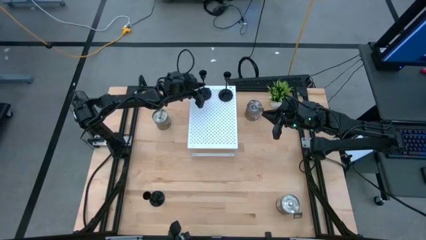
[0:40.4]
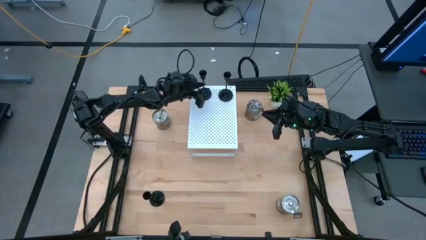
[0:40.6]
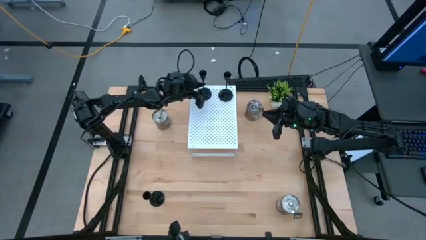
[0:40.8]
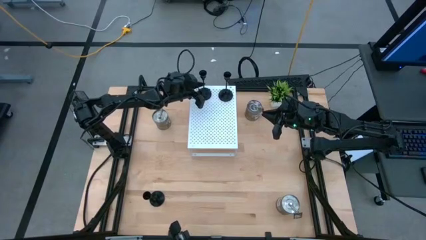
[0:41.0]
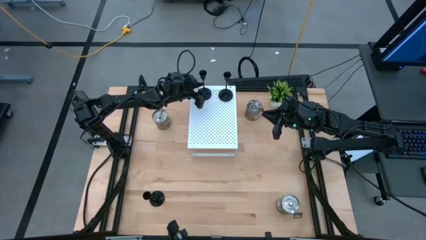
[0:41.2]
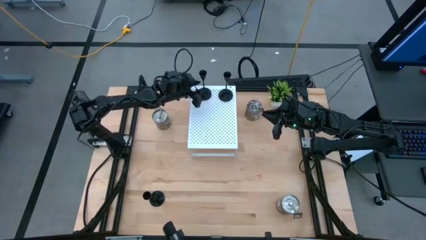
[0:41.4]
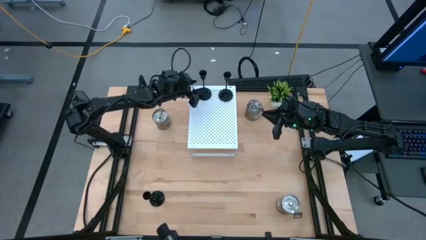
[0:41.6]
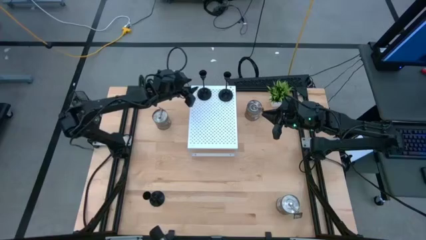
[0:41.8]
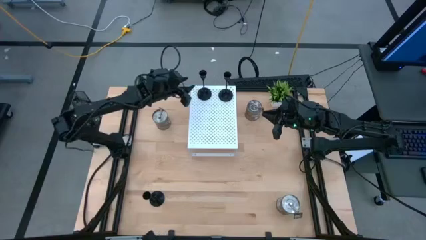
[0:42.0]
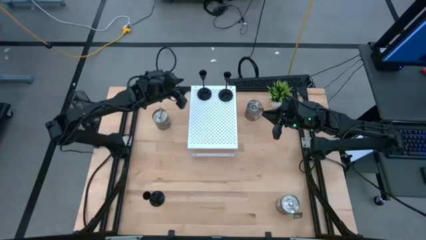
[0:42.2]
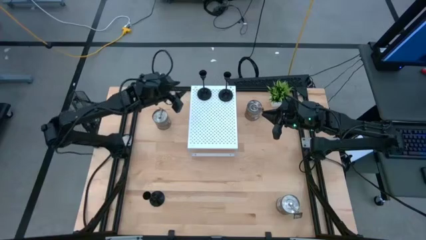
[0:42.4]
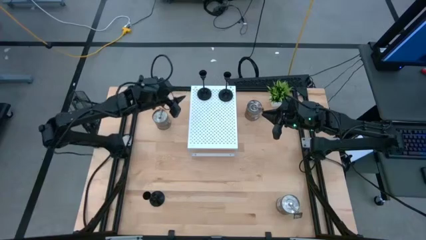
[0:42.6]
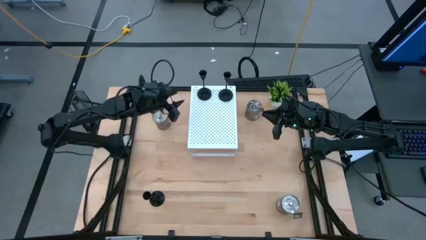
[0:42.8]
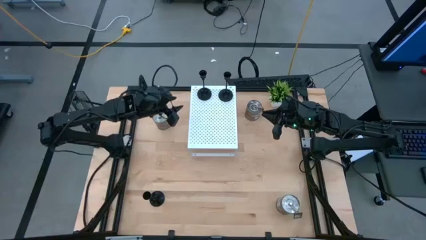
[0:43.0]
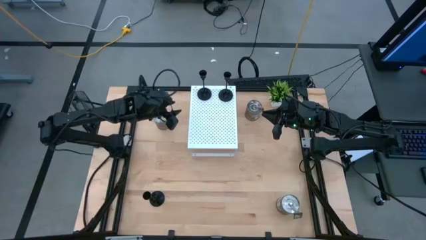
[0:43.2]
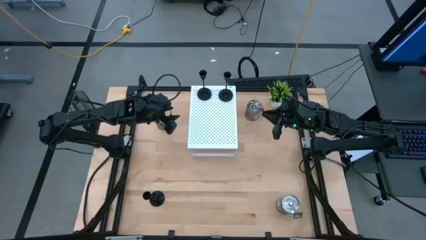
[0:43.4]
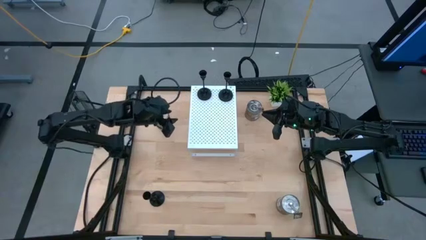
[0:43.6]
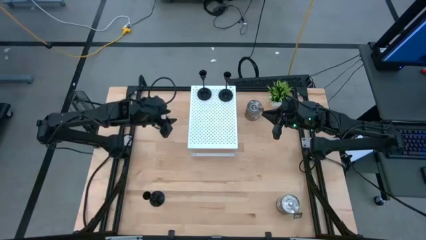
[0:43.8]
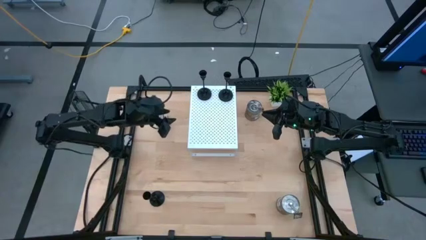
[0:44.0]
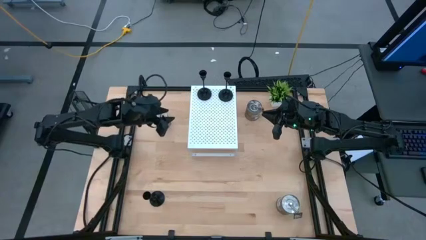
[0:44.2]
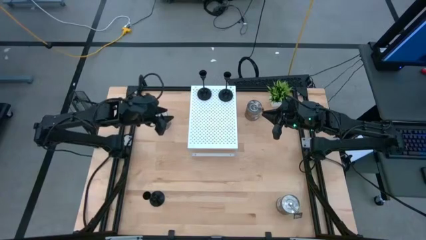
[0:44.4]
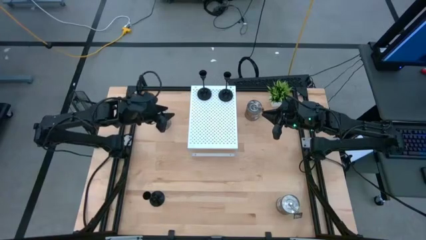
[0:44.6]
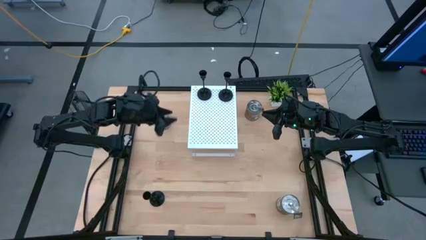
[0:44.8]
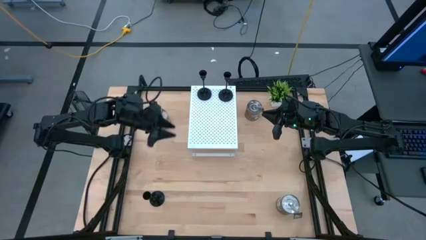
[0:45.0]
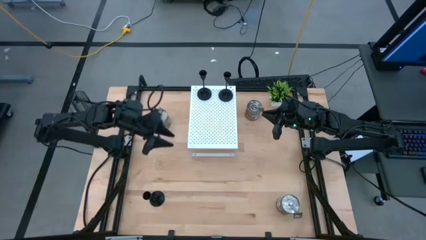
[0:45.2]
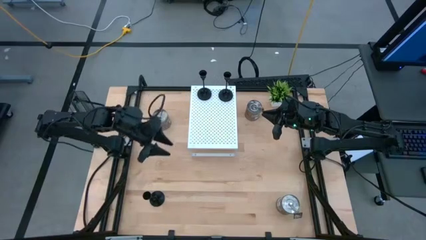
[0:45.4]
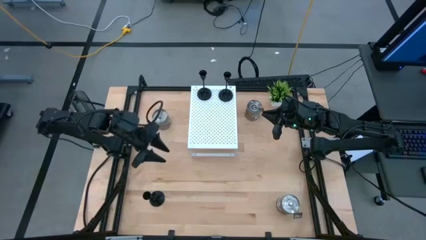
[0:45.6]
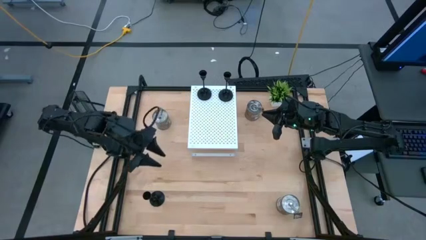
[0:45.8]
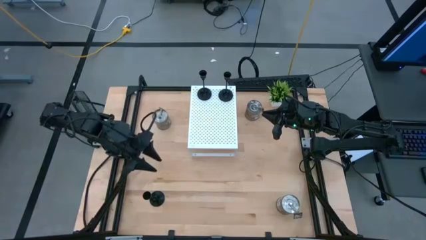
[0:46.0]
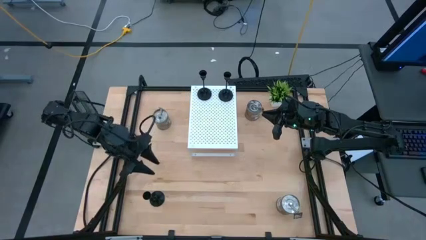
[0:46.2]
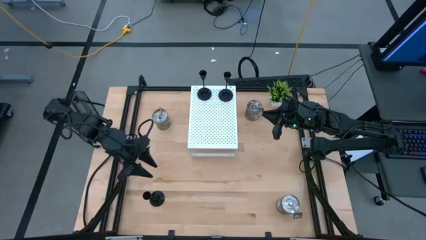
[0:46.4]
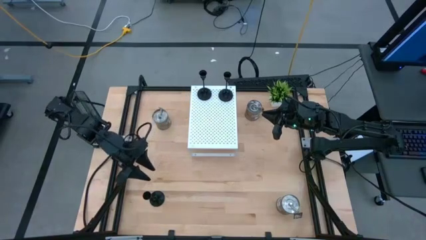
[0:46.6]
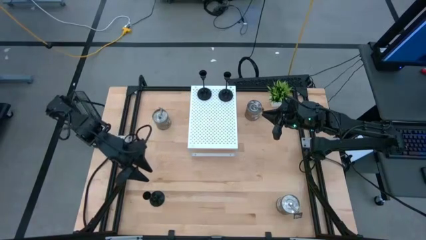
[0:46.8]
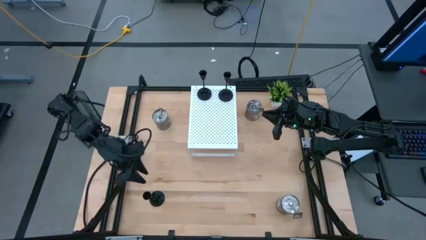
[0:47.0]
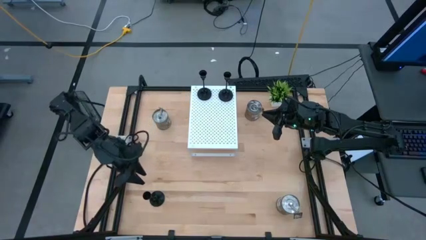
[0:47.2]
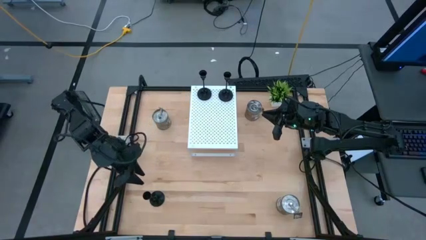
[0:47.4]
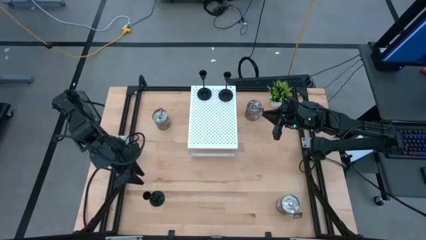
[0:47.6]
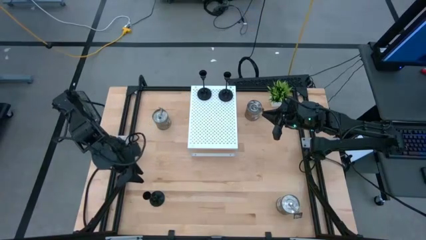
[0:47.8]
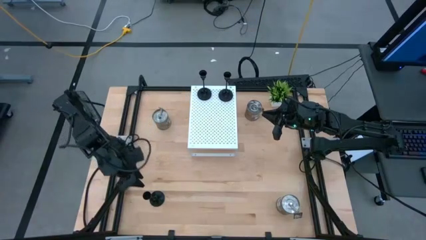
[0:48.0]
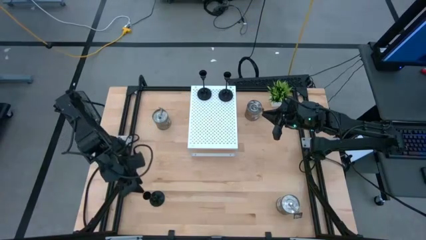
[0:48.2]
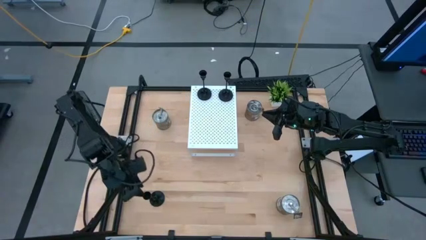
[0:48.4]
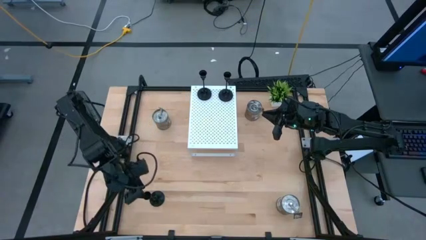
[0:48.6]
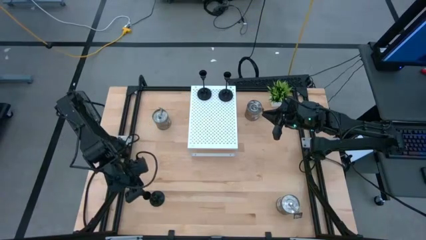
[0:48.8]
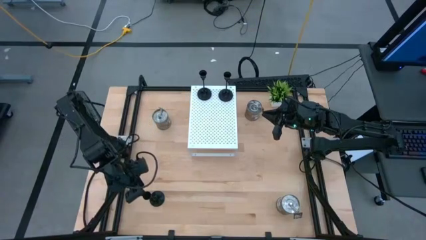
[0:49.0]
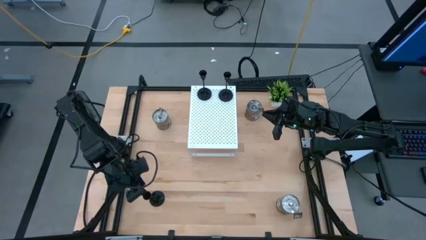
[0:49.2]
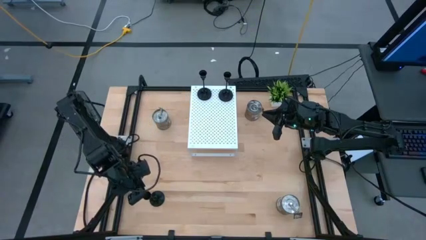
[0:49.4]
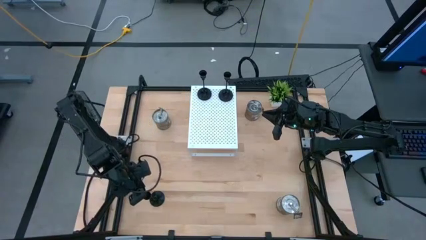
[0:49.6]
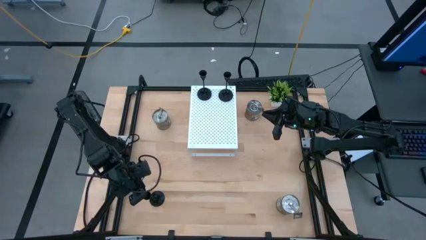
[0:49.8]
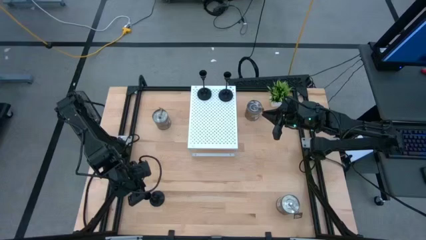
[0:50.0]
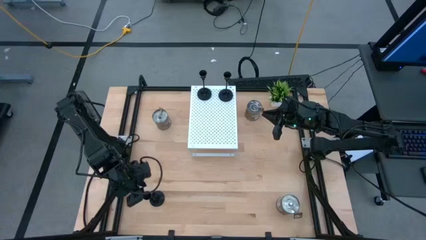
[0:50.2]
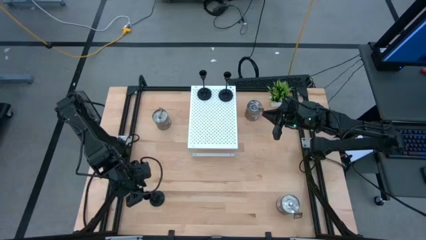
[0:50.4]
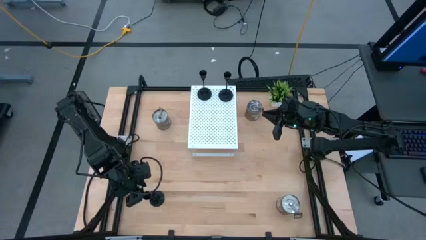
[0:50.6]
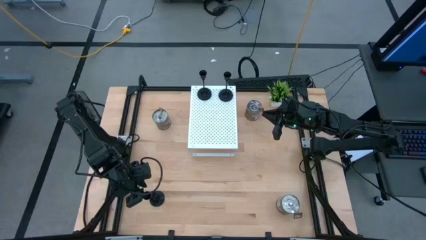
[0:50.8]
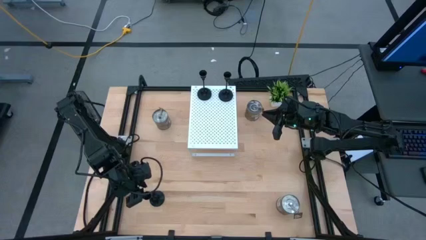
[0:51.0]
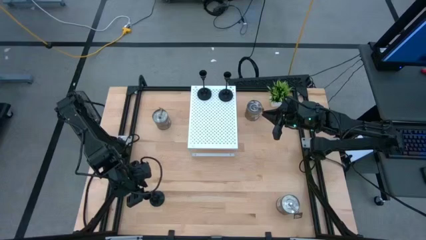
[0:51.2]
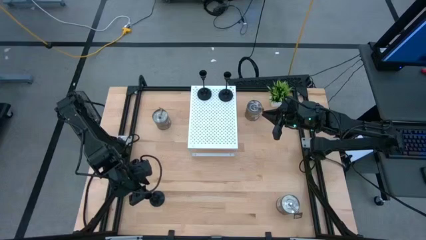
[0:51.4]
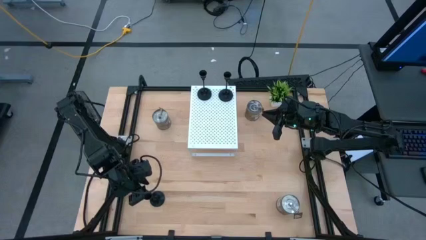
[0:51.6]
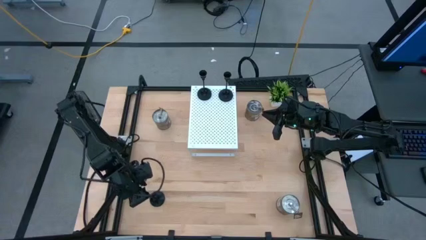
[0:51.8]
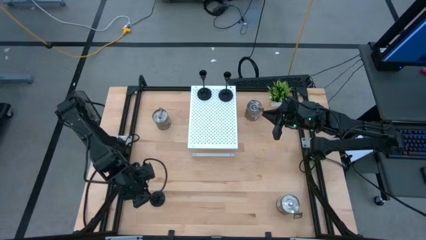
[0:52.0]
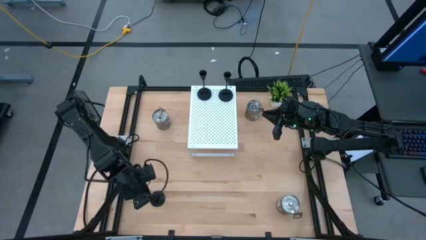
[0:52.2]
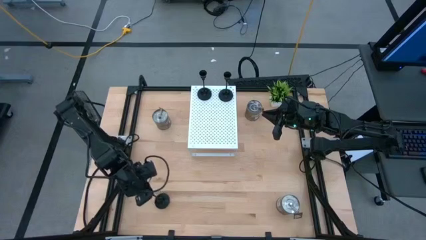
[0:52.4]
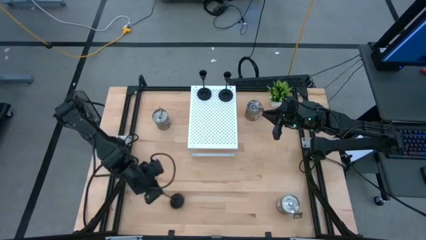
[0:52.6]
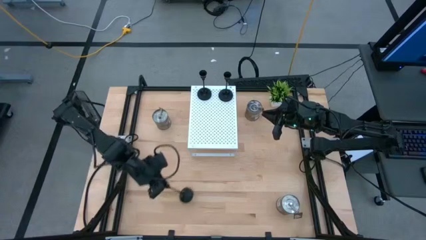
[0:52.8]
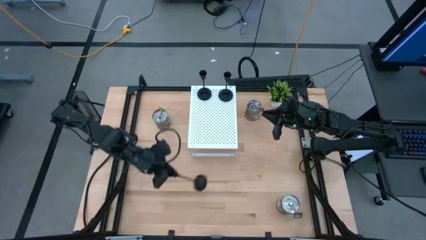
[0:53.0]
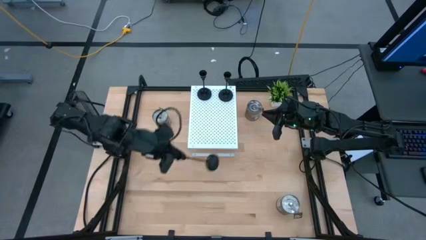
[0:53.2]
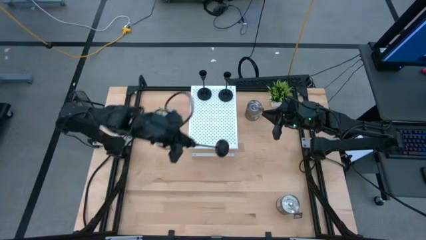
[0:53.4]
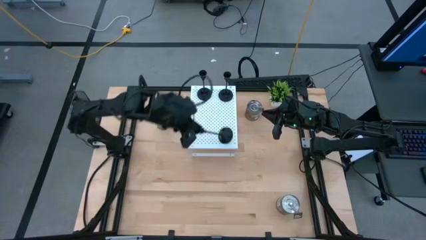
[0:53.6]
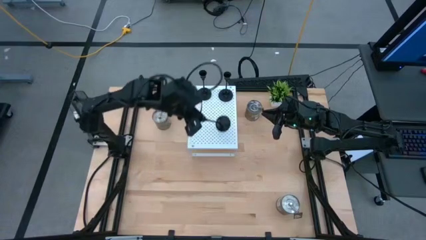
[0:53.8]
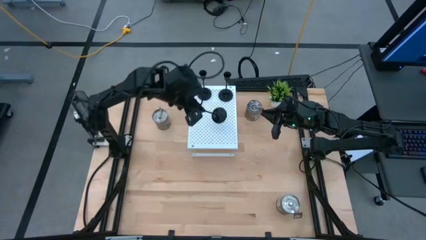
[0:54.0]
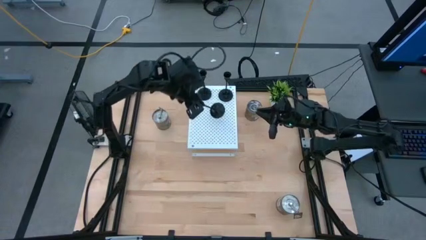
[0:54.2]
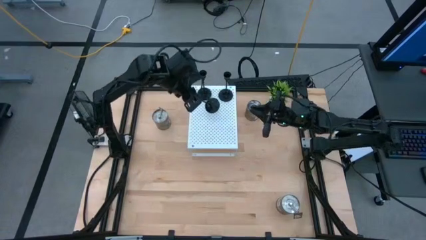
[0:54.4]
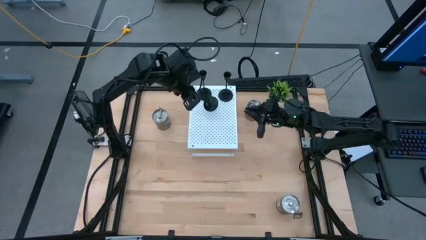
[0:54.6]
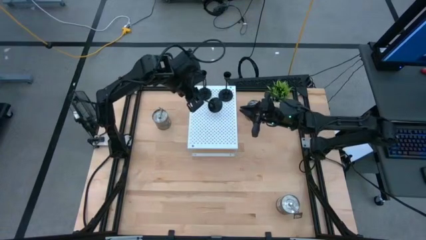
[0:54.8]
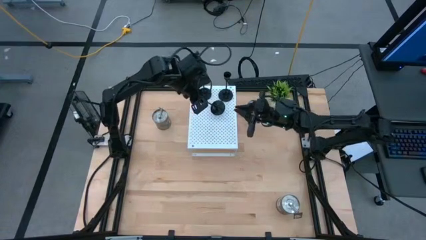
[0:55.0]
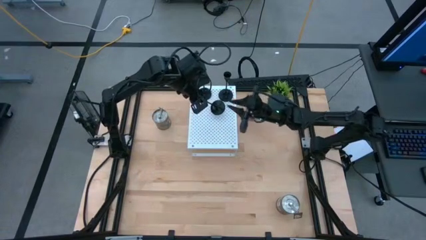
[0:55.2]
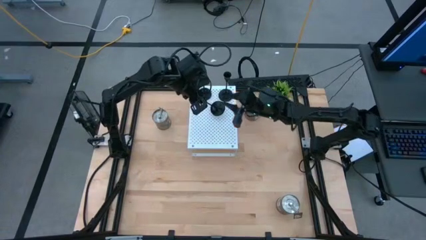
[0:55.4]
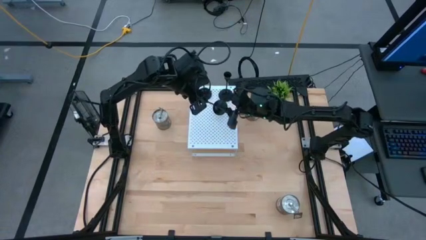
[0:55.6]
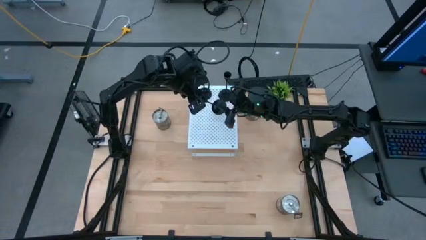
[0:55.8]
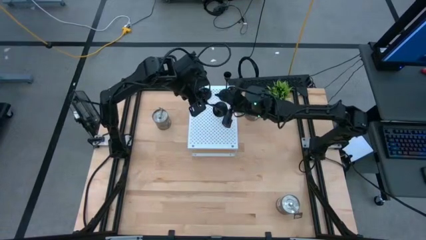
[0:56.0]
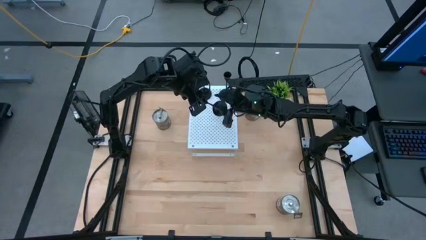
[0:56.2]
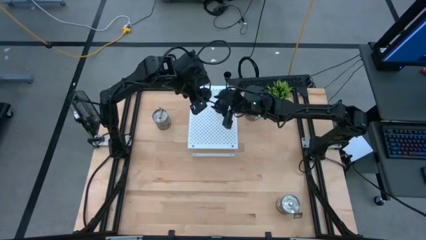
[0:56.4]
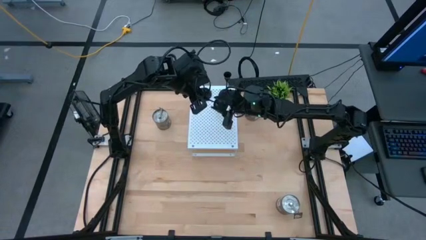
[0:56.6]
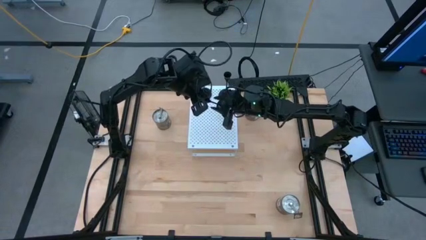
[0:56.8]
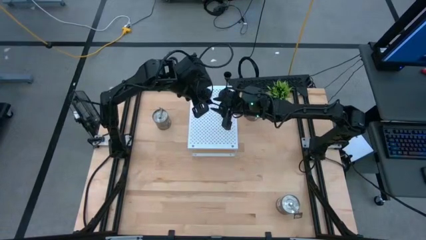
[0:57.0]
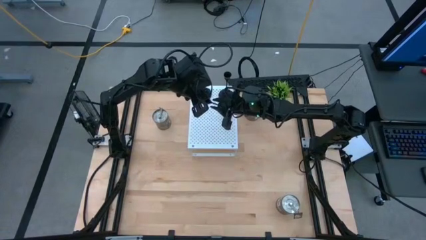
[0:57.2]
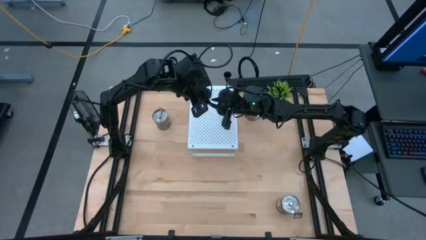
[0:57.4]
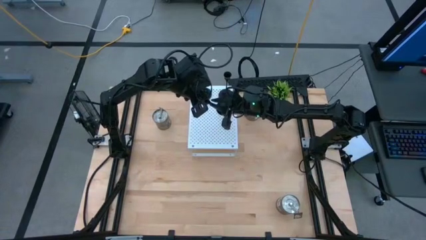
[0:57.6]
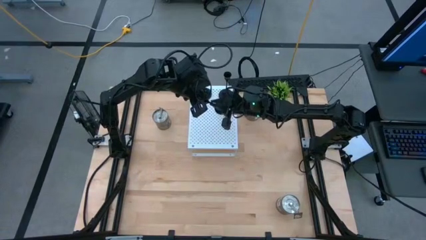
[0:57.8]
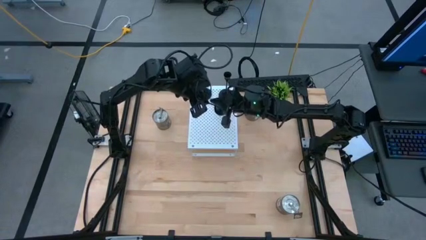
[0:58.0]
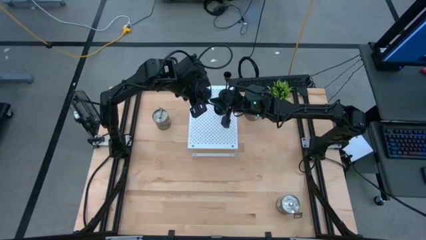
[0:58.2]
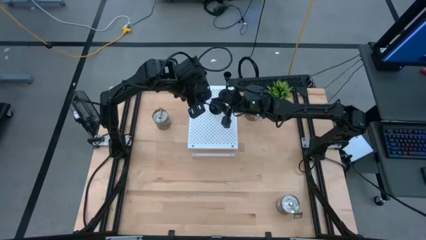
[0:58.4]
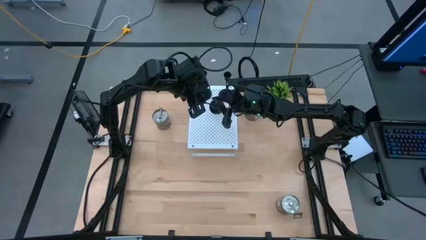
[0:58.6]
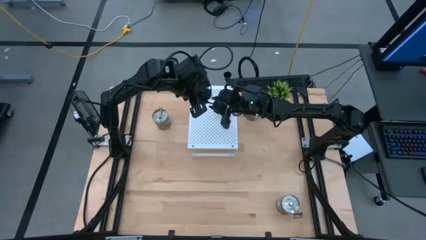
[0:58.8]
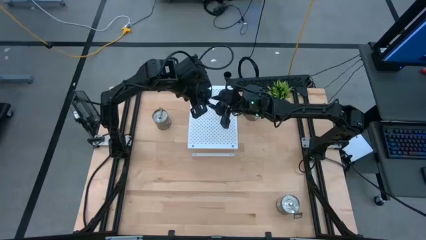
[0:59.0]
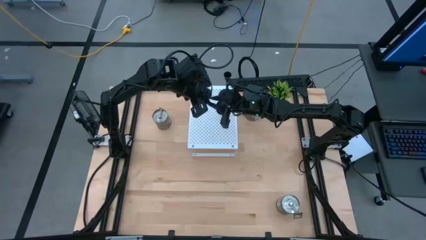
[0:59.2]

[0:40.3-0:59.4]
Task: Pick & Place candle stick holders
Put the black candle holder on the shelf
